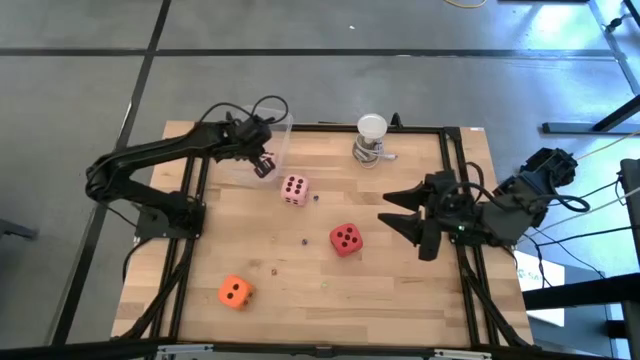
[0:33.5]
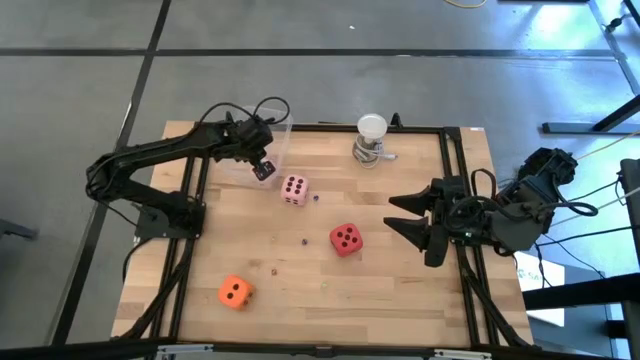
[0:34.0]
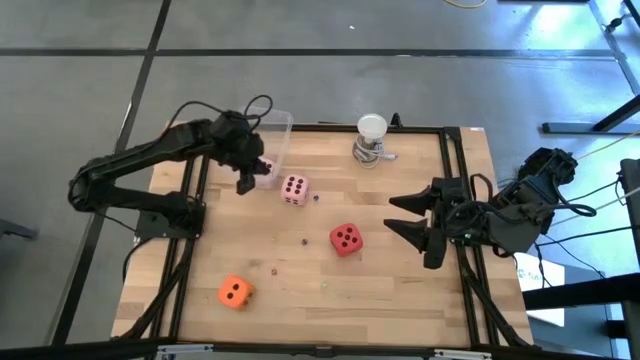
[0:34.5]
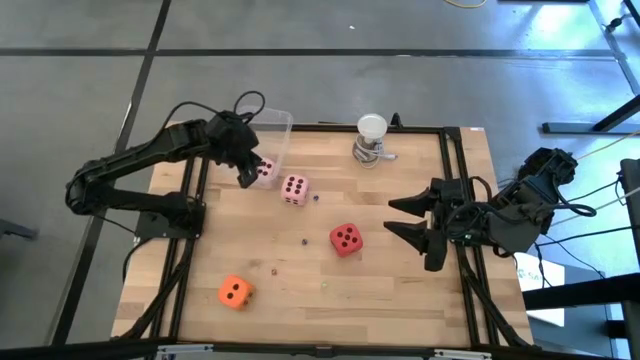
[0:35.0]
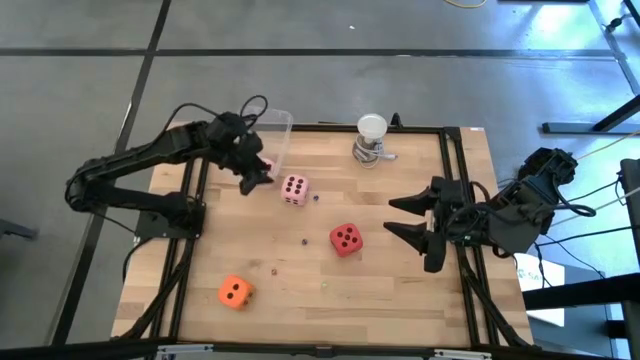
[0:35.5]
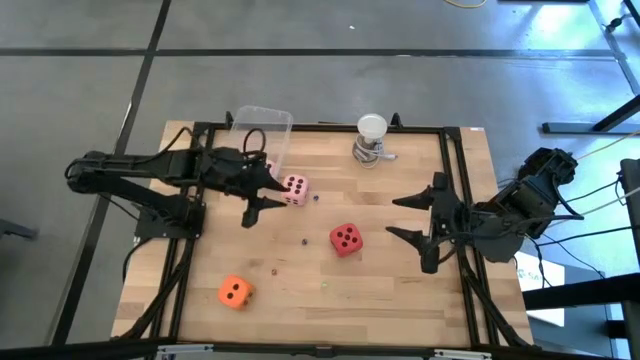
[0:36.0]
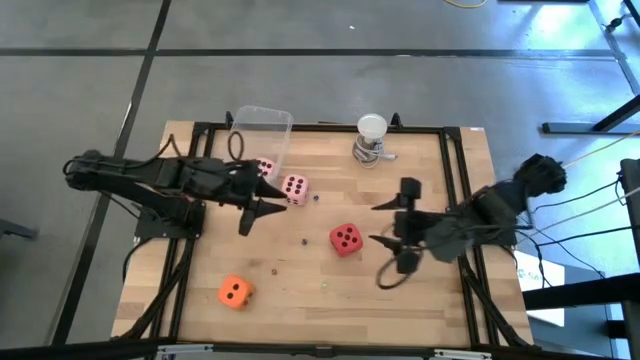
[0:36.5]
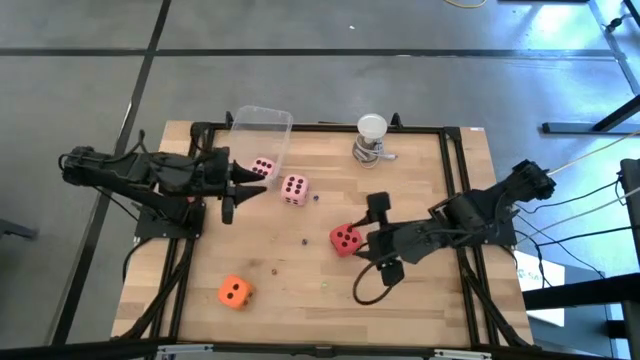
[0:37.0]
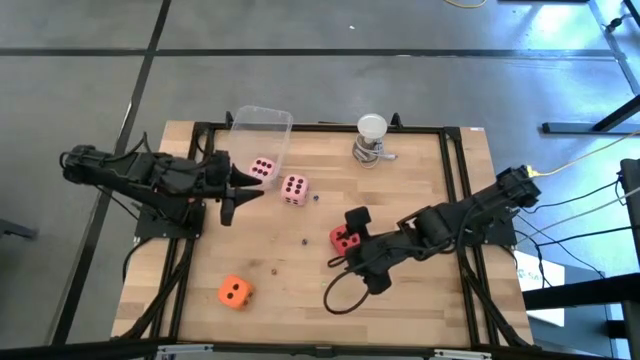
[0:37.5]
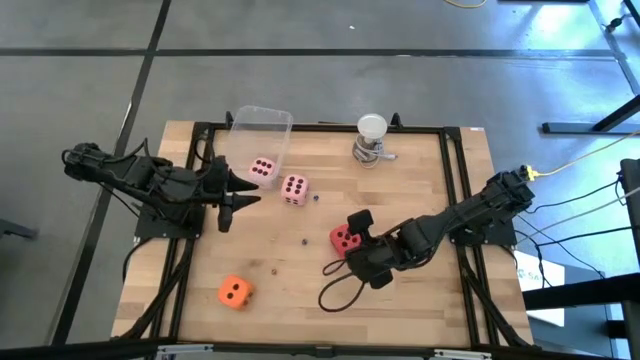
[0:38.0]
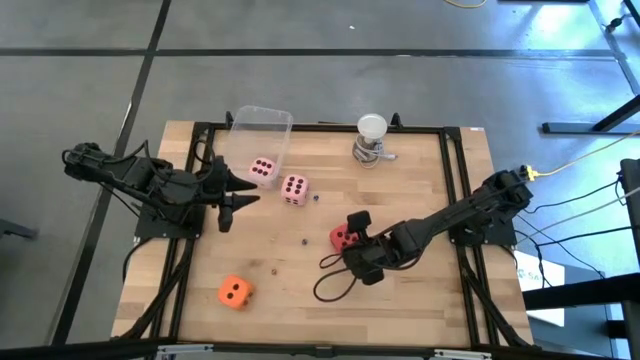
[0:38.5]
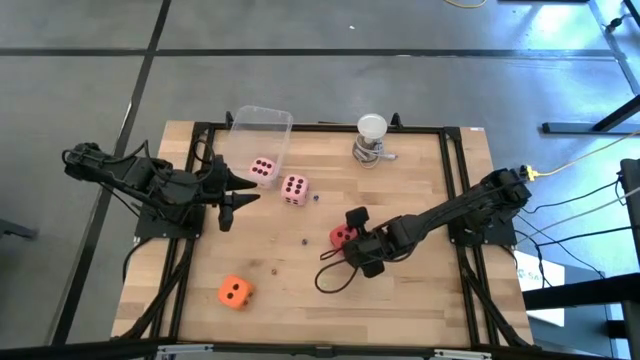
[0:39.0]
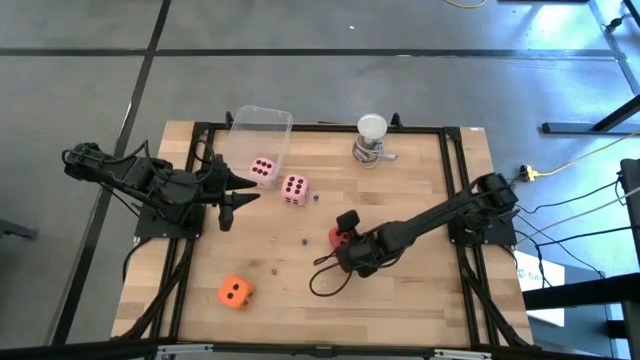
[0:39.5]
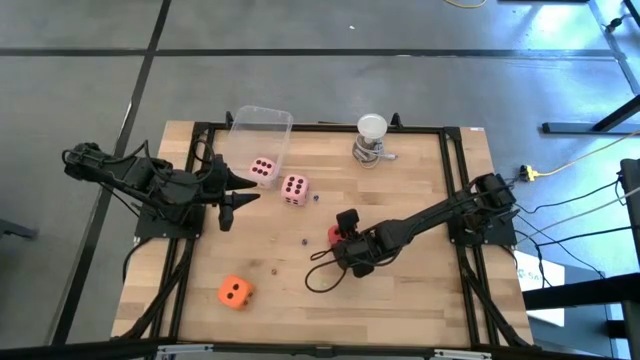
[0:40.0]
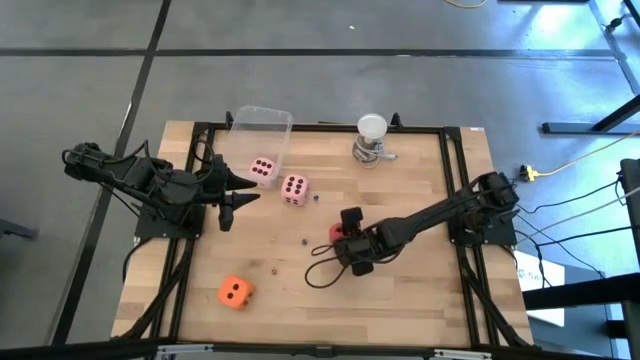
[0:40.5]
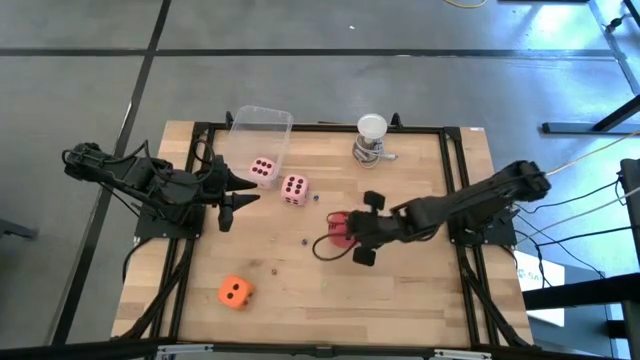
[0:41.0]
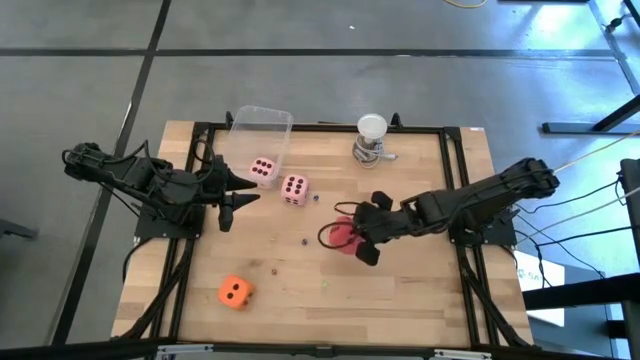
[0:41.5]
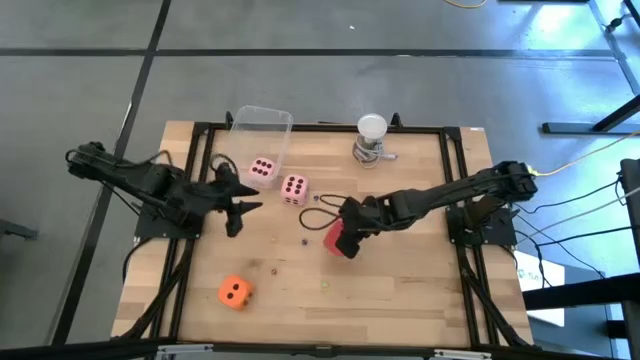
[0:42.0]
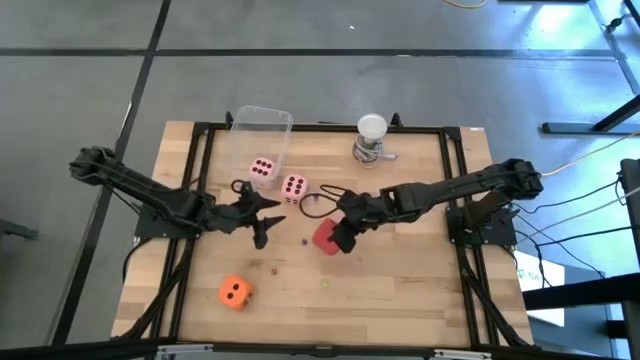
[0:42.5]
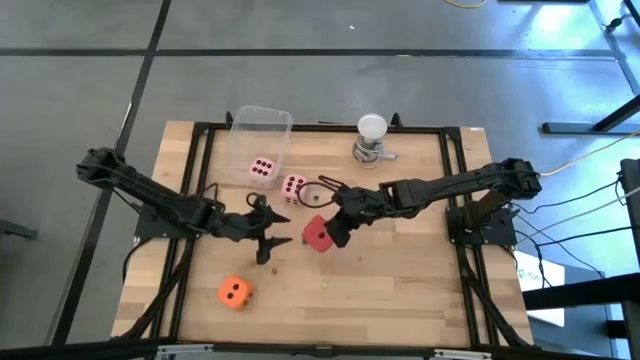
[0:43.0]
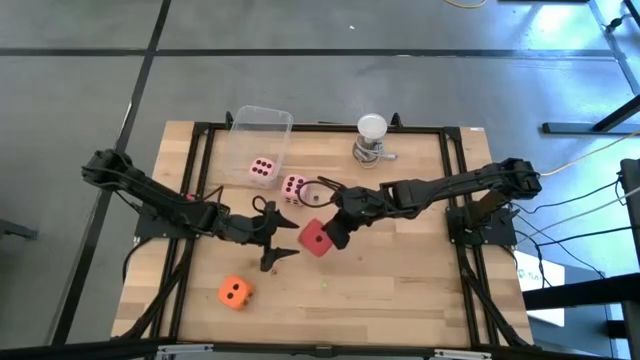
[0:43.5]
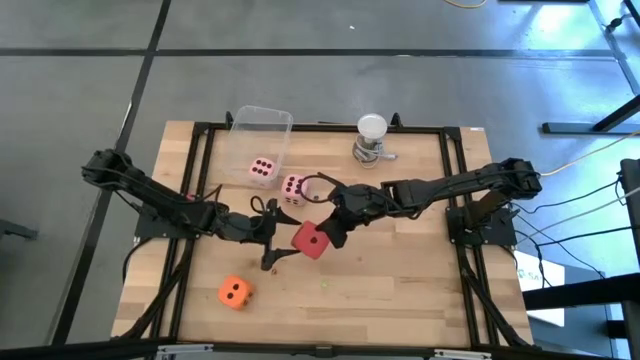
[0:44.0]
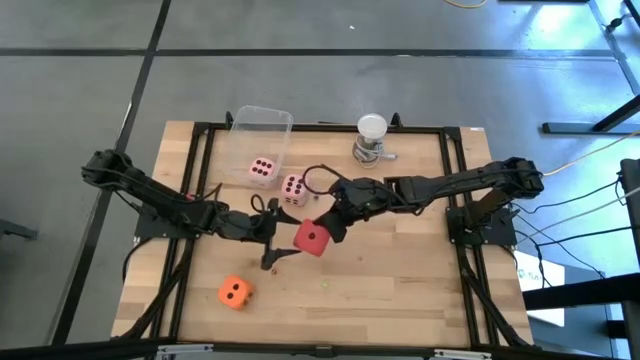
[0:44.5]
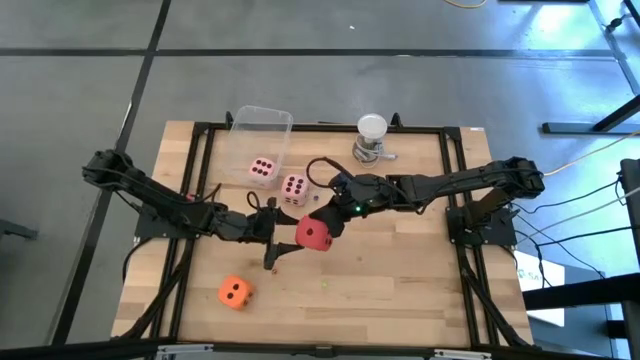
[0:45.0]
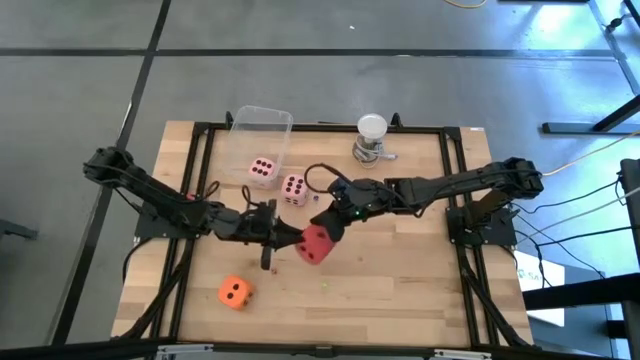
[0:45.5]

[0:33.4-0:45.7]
Task: Pick & Place Dice
Put the large red dice into the transparent bin

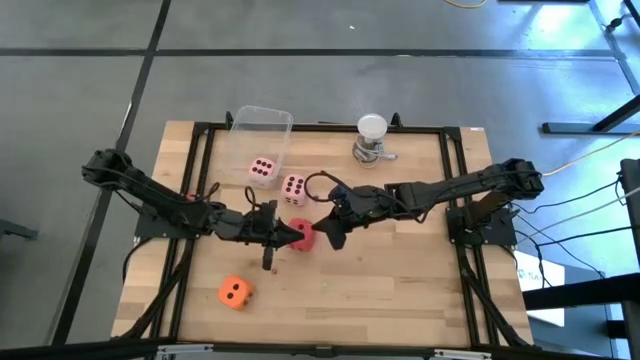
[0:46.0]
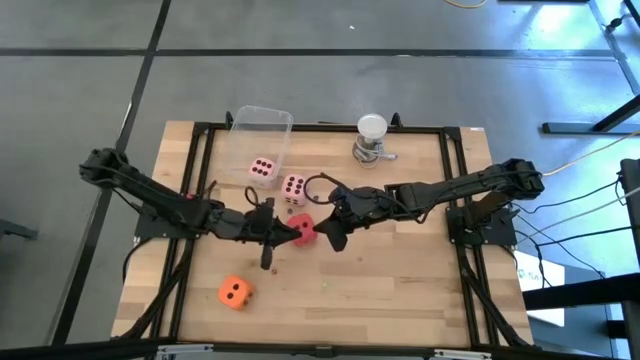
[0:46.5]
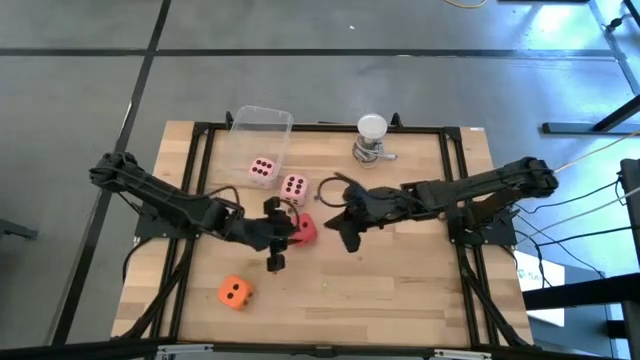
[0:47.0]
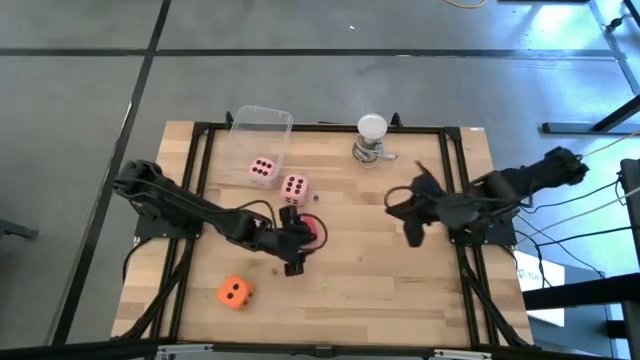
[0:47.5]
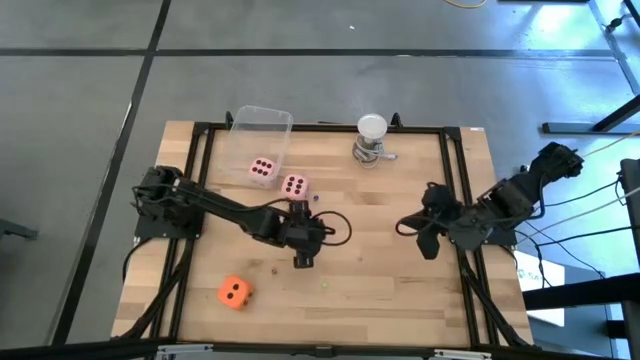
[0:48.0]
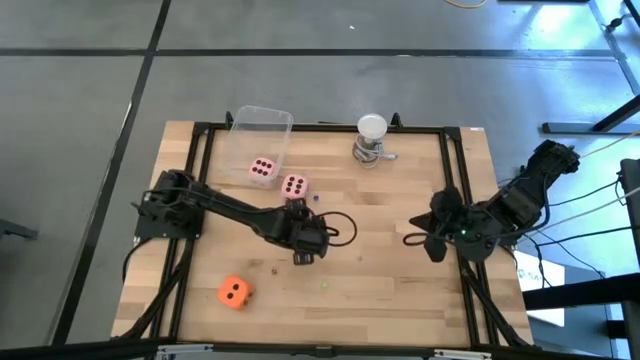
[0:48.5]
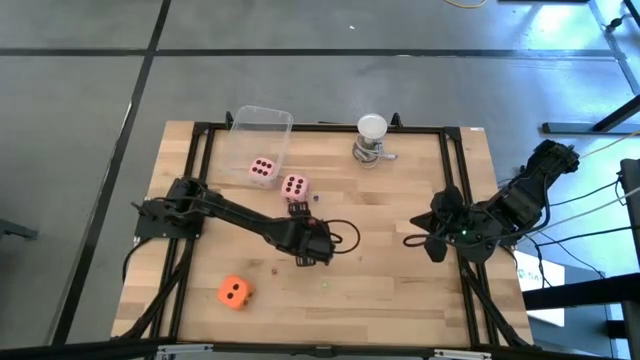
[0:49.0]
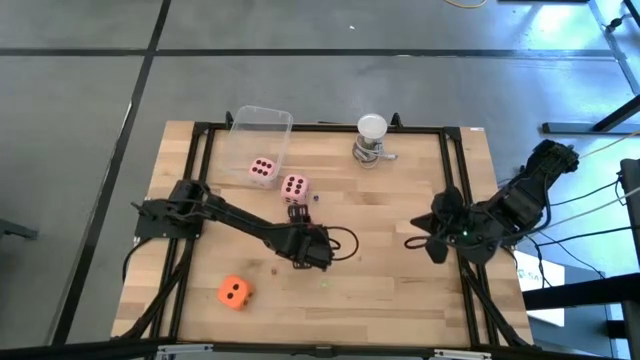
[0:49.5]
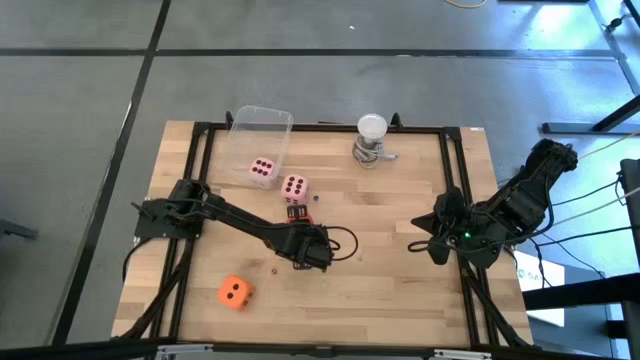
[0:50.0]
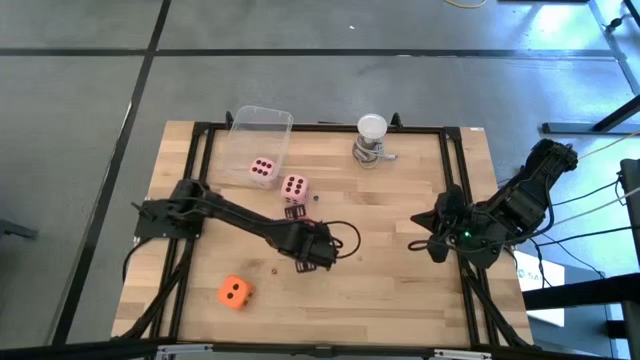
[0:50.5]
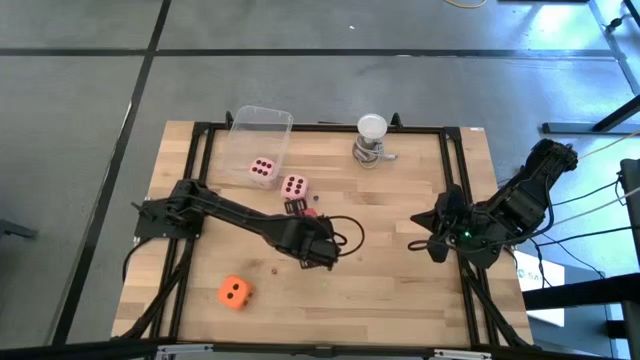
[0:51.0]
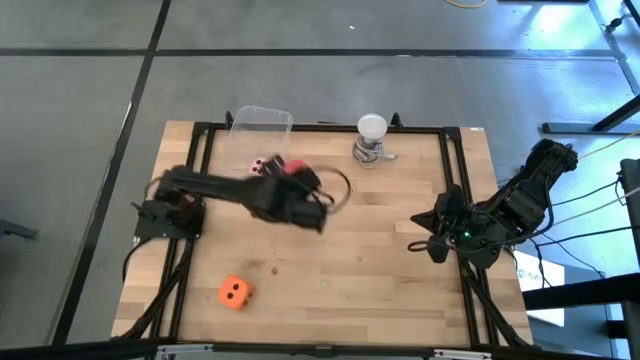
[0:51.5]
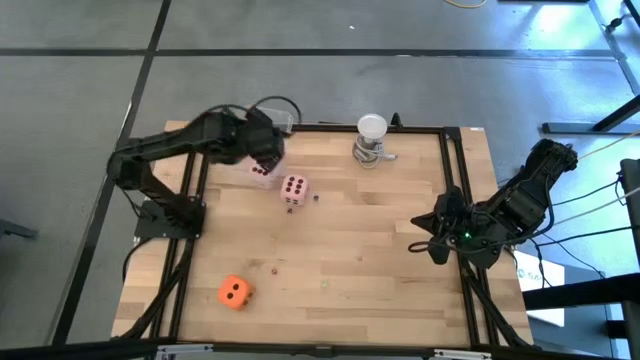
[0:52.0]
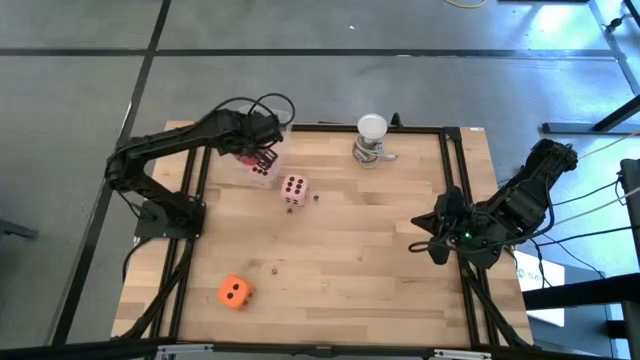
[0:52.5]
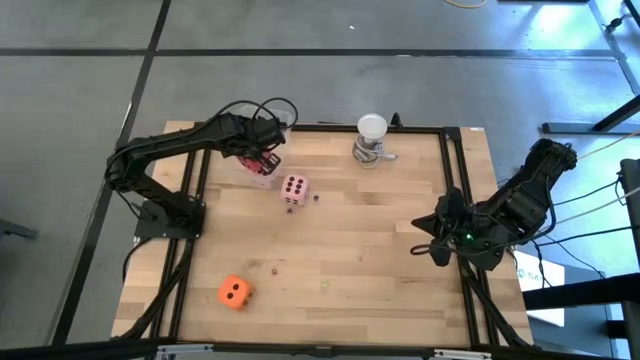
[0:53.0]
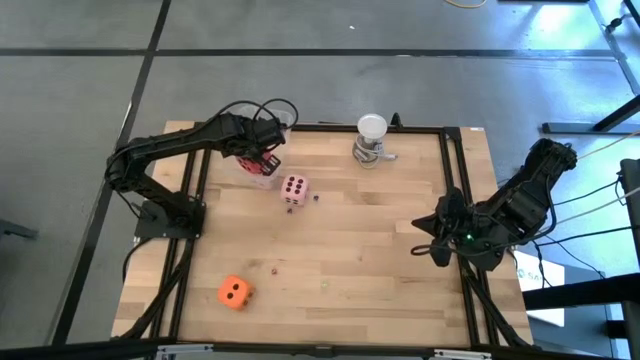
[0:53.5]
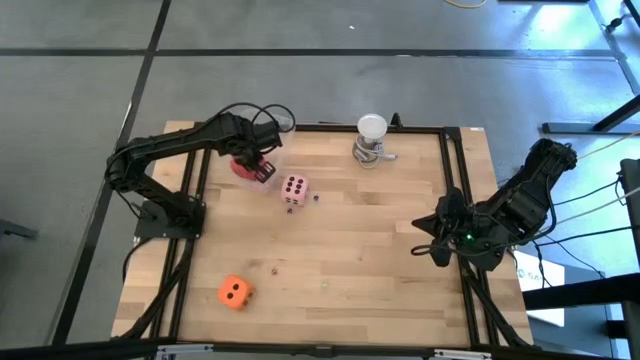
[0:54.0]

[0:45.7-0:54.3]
Put the large red dice into the transparent bin
